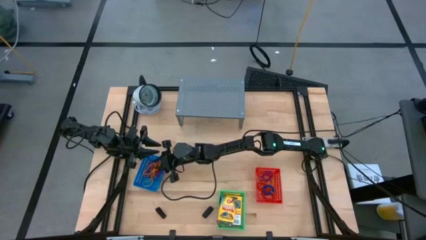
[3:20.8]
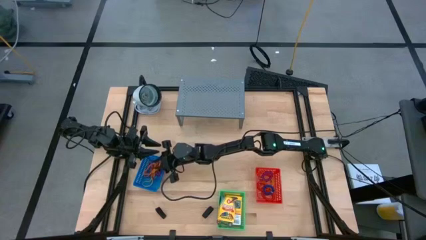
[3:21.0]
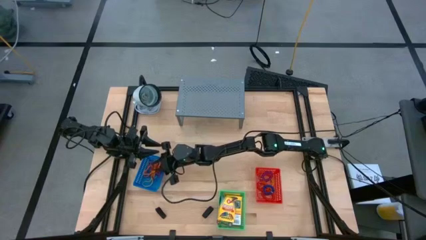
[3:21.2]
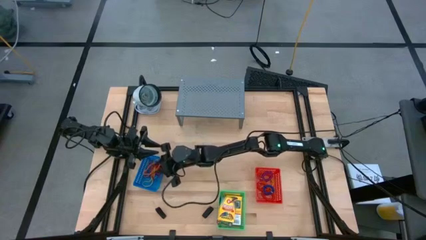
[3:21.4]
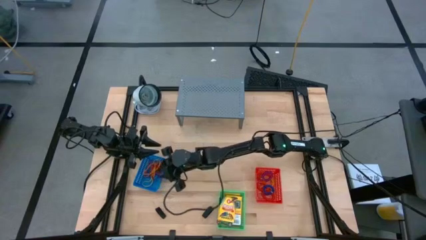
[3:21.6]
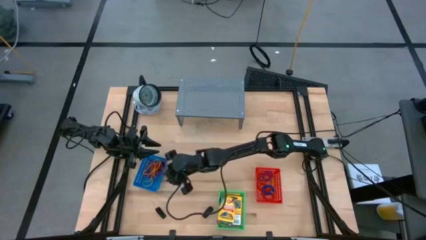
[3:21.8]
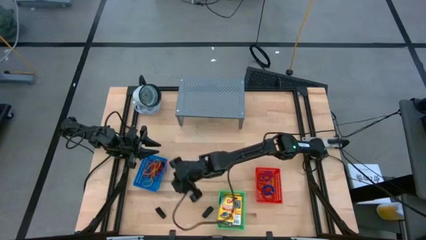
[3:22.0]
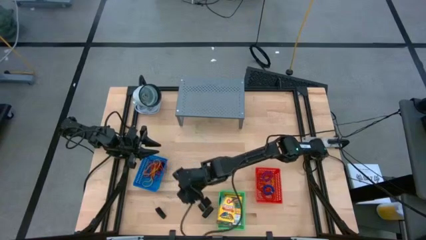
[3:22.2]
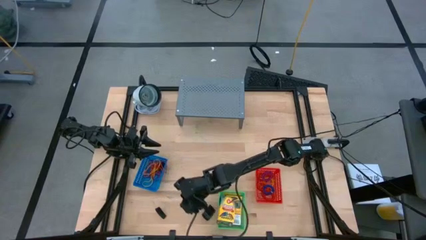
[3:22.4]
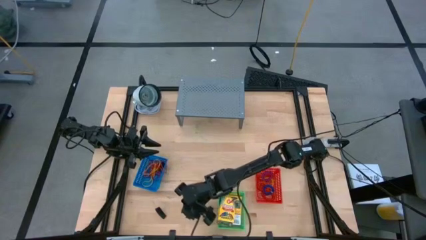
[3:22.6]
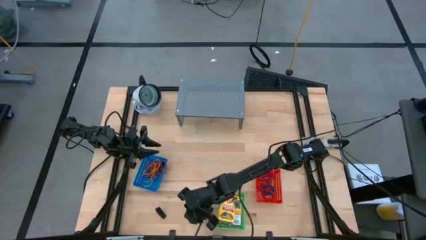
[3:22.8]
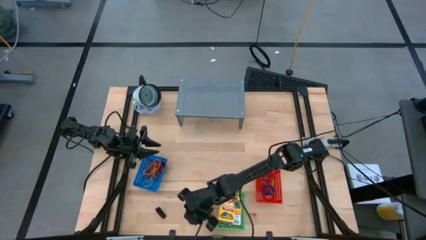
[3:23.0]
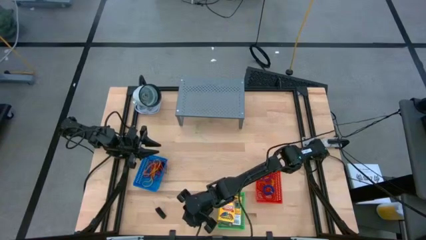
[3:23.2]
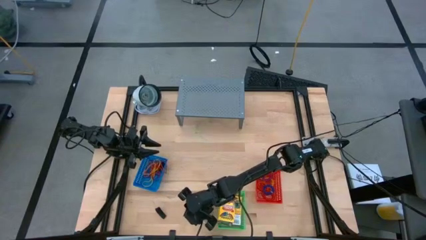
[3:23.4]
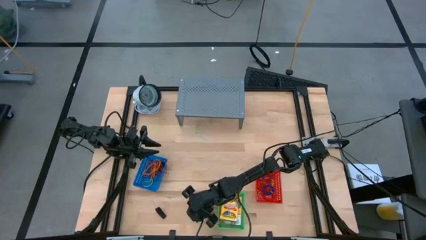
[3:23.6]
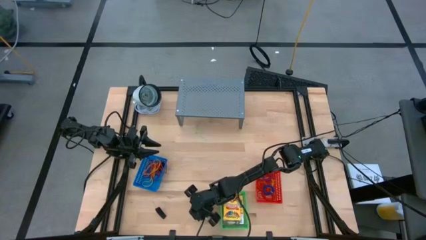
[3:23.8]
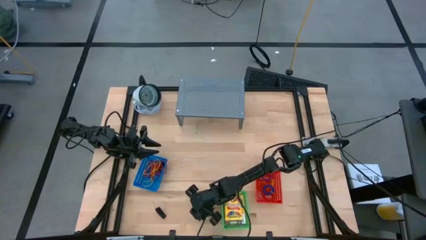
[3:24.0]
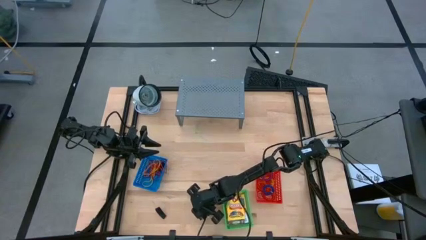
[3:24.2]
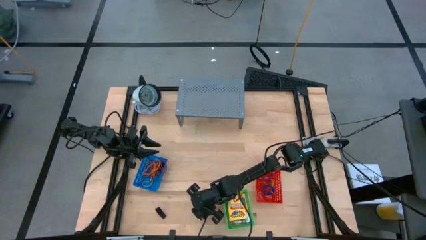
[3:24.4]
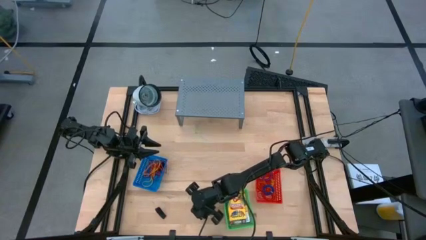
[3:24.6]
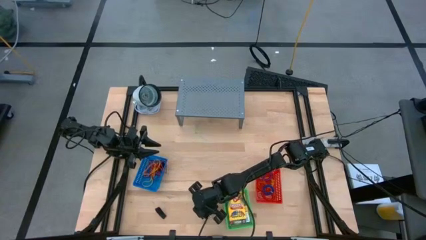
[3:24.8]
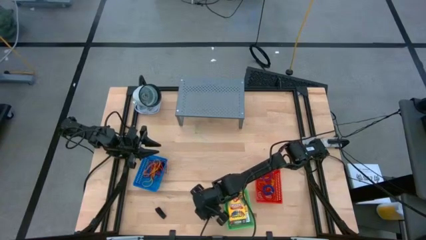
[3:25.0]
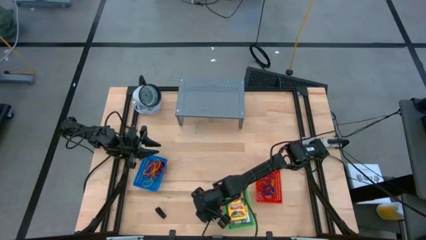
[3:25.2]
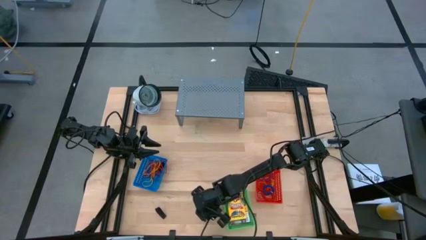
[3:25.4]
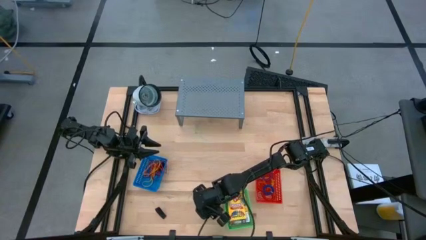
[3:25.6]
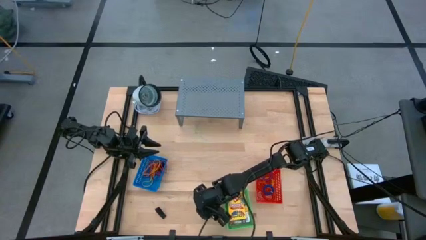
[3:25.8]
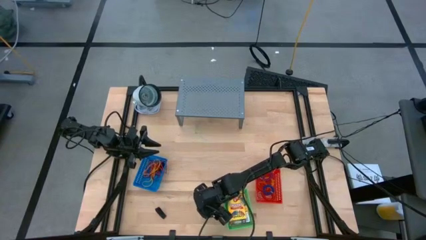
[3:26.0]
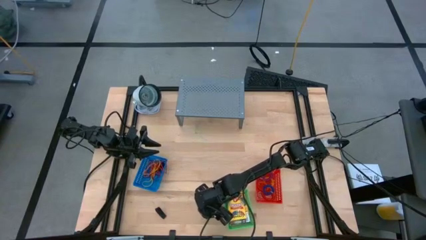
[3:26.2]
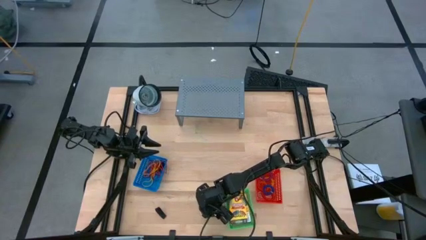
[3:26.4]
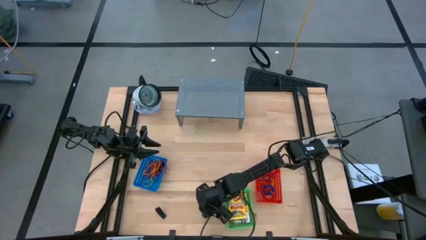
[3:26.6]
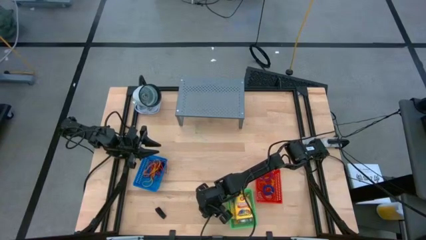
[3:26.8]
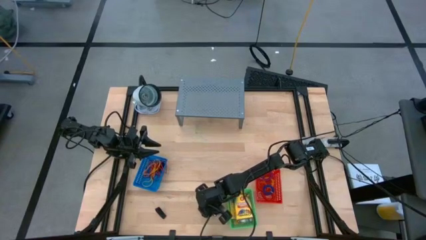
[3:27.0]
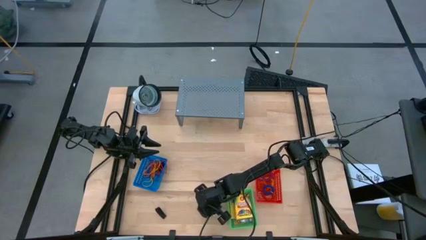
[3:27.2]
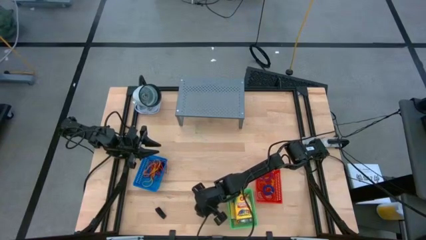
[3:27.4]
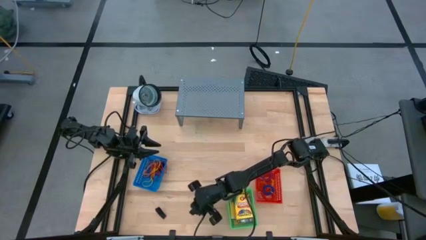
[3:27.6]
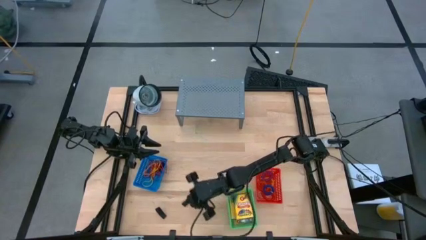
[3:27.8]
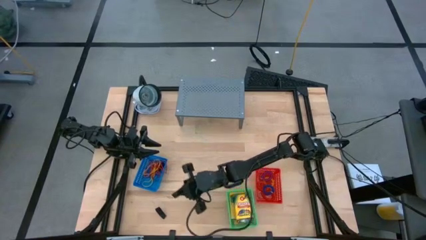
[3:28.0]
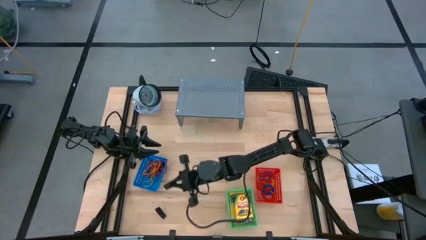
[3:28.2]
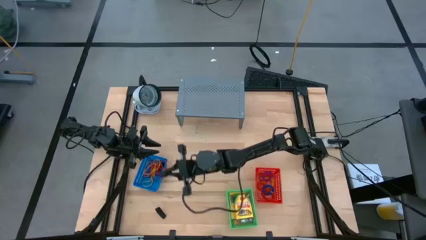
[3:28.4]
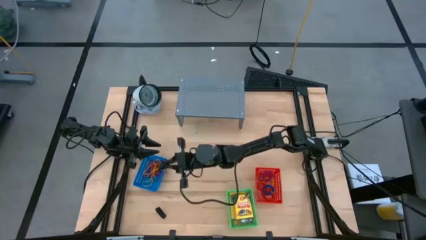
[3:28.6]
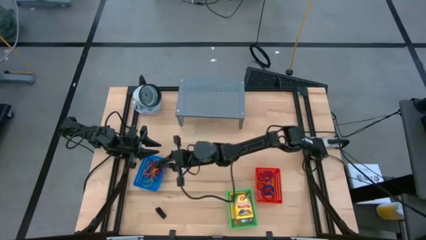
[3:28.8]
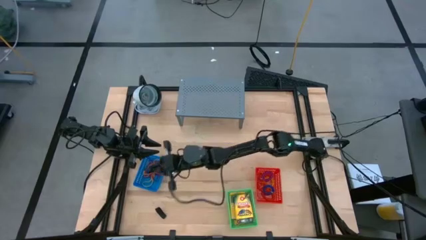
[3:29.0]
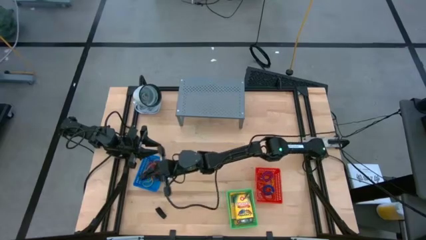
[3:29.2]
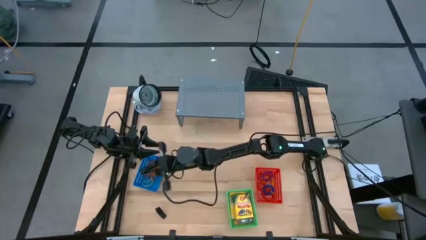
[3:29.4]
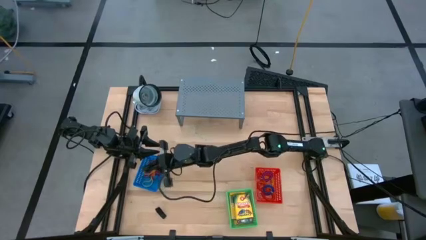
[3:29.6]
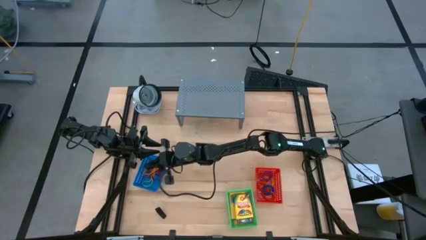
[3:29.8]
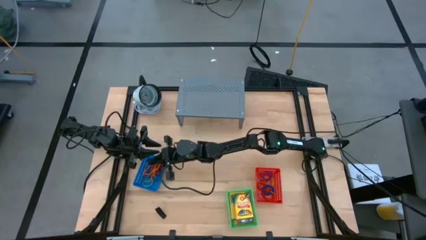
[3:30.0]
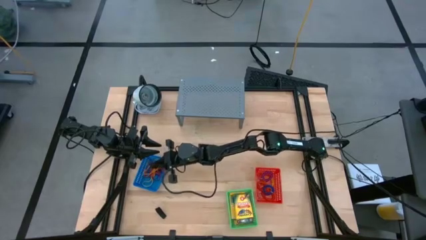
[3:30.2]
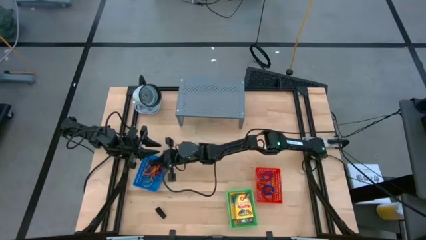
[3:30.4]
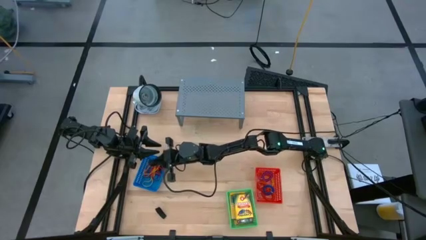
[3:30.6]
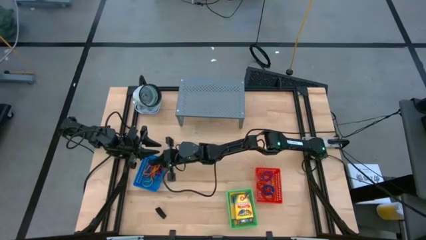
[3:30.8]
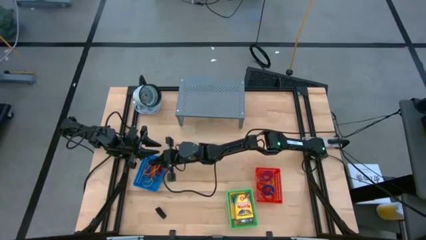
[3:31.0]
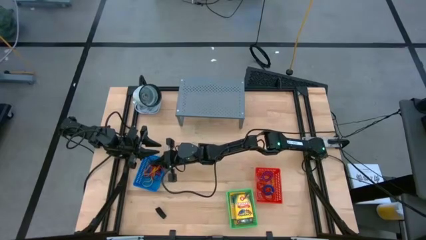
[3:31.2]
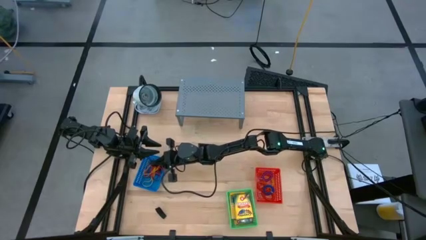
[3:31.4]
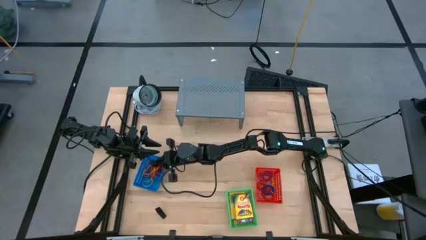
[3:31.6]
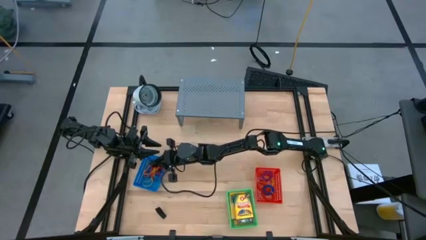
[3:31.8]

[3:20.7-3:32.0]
Task: Pick & Place Office Desk Supplies
Put the black rubber band into the blue bin
